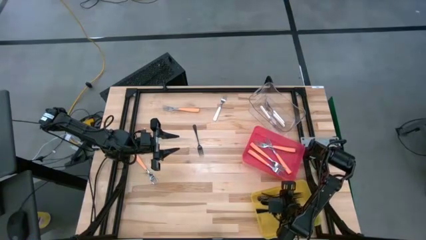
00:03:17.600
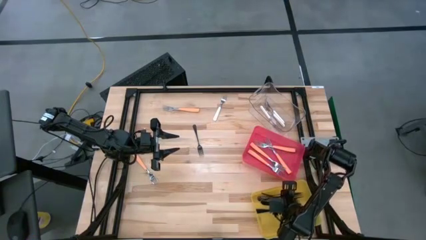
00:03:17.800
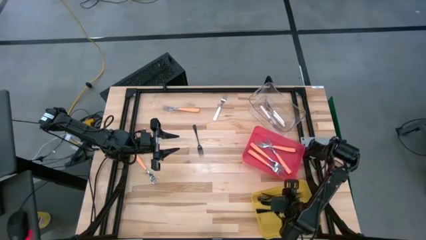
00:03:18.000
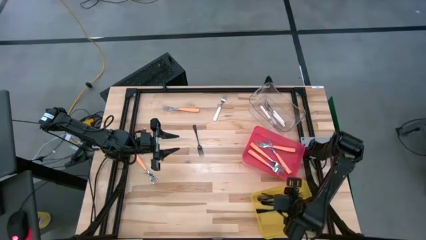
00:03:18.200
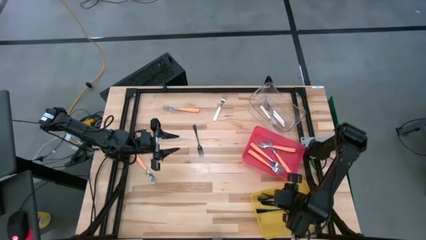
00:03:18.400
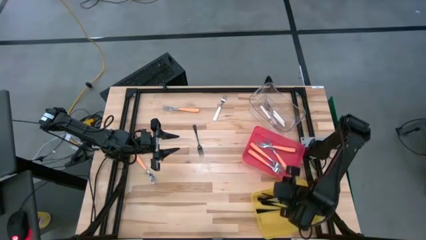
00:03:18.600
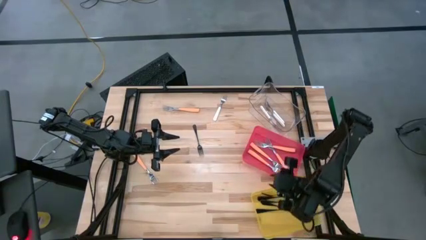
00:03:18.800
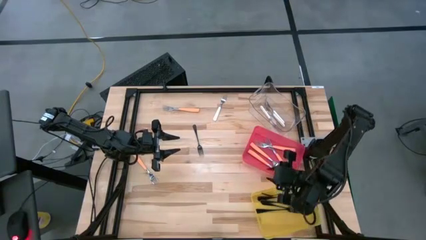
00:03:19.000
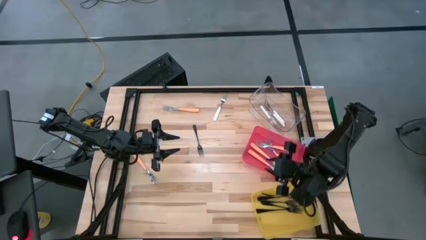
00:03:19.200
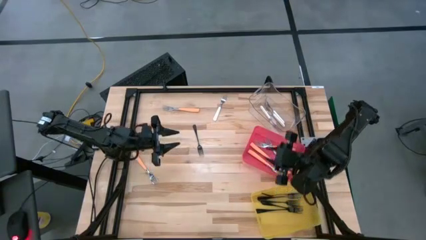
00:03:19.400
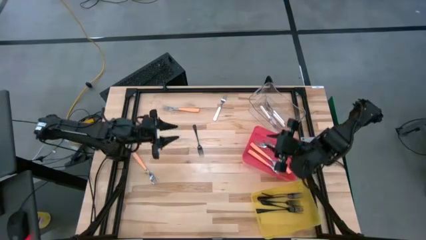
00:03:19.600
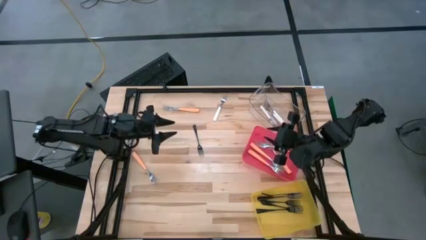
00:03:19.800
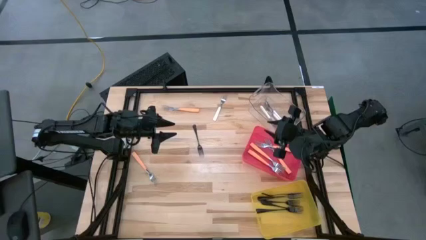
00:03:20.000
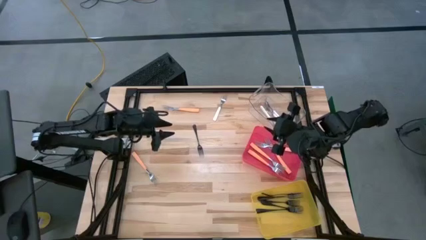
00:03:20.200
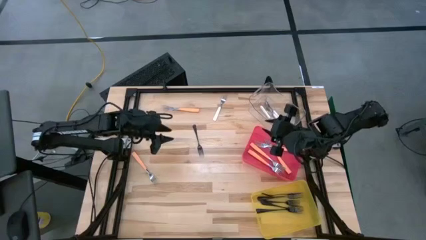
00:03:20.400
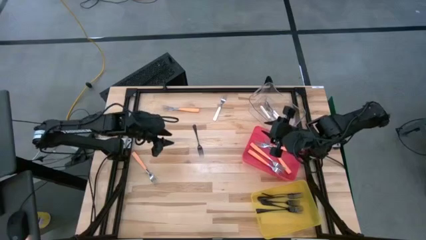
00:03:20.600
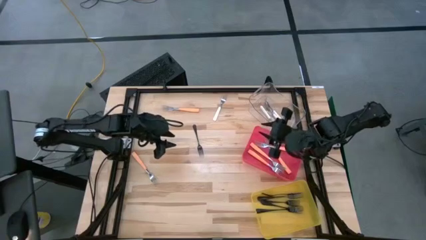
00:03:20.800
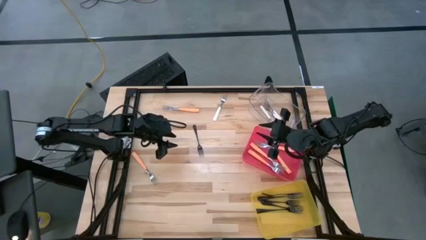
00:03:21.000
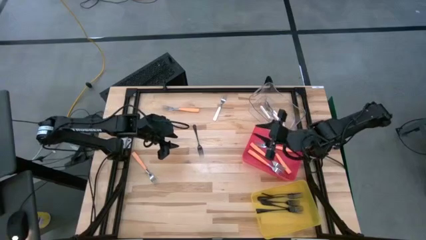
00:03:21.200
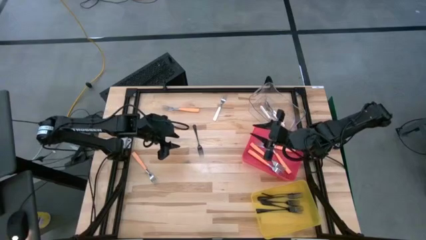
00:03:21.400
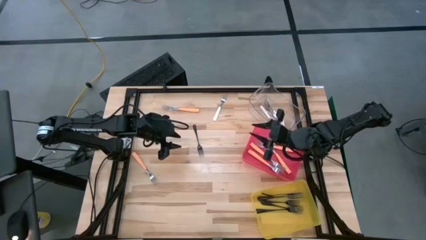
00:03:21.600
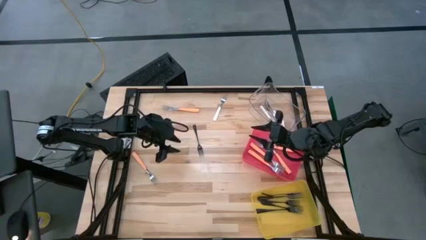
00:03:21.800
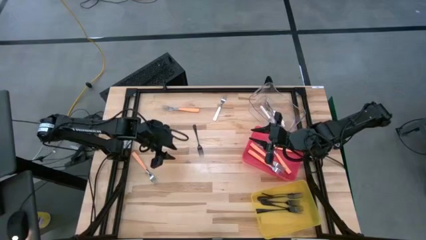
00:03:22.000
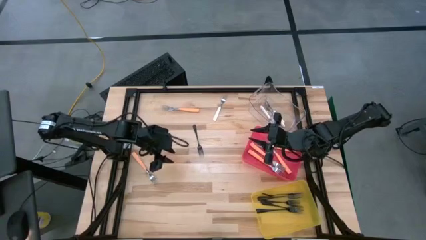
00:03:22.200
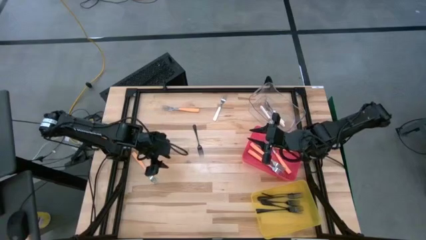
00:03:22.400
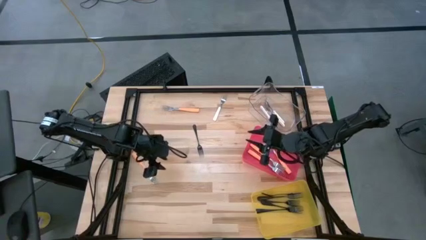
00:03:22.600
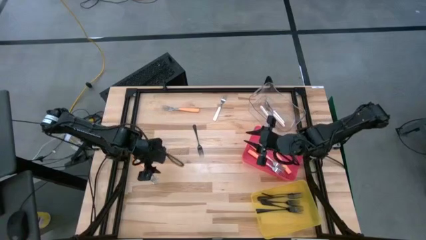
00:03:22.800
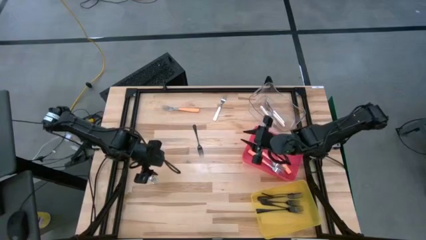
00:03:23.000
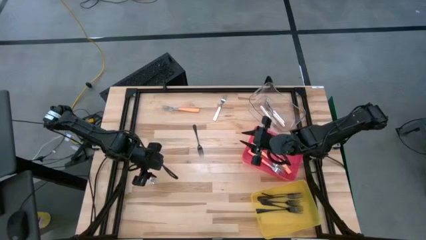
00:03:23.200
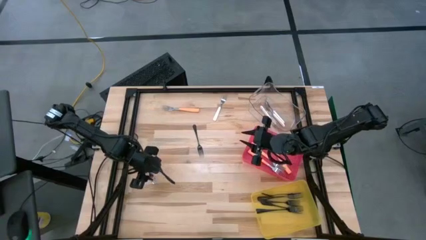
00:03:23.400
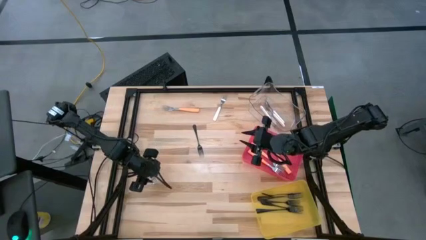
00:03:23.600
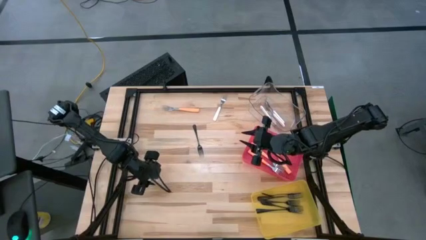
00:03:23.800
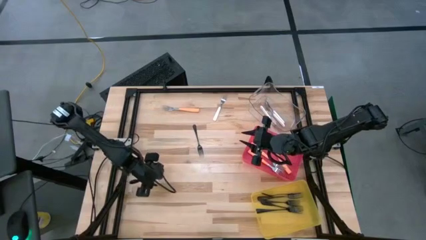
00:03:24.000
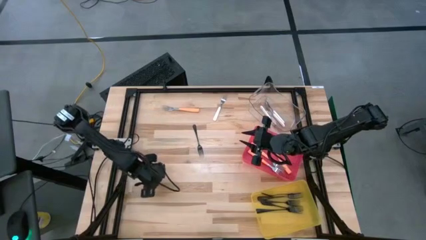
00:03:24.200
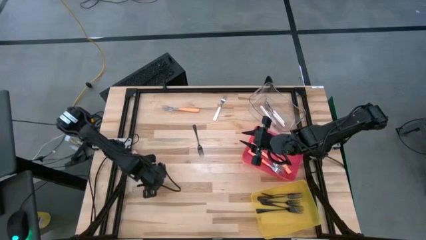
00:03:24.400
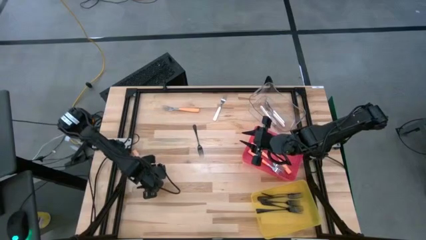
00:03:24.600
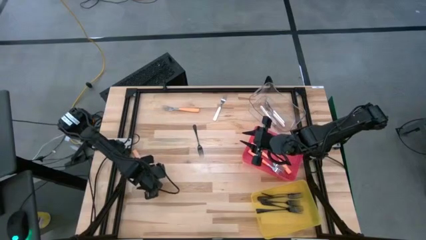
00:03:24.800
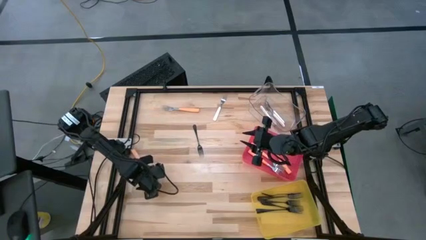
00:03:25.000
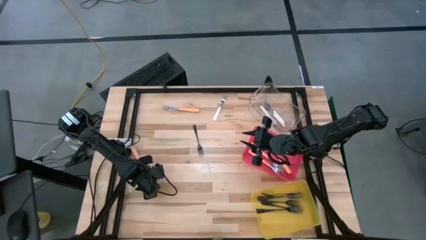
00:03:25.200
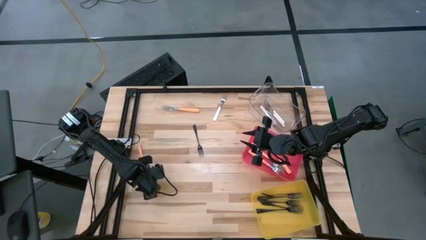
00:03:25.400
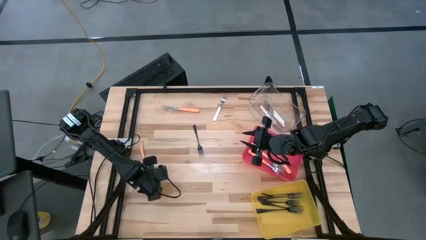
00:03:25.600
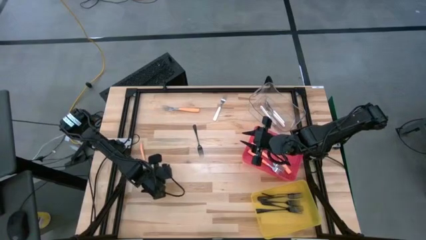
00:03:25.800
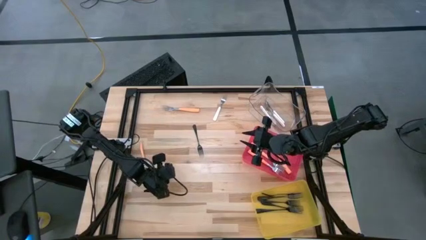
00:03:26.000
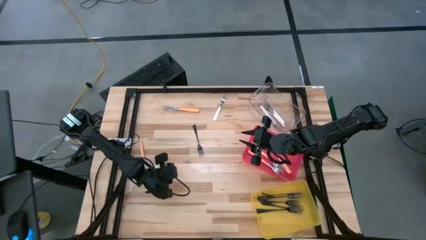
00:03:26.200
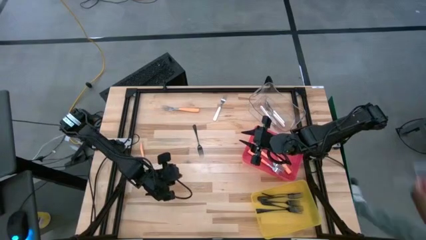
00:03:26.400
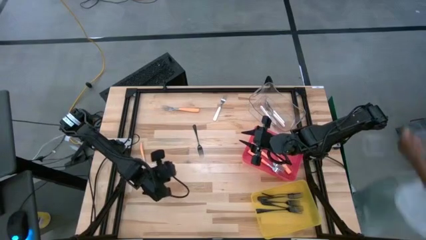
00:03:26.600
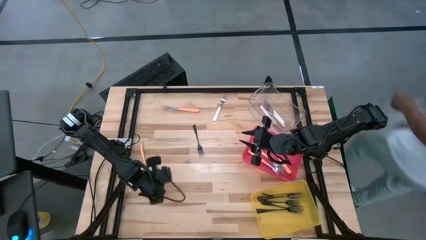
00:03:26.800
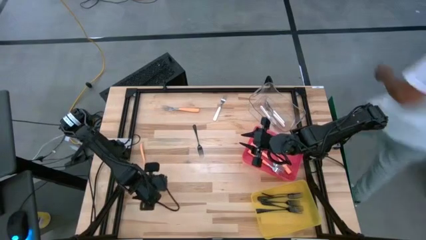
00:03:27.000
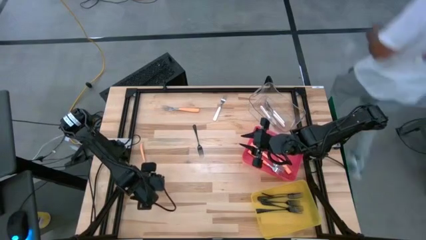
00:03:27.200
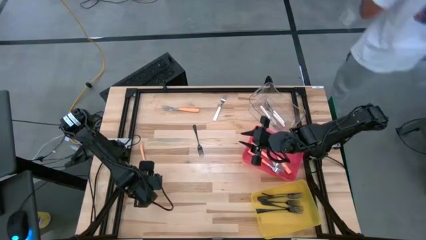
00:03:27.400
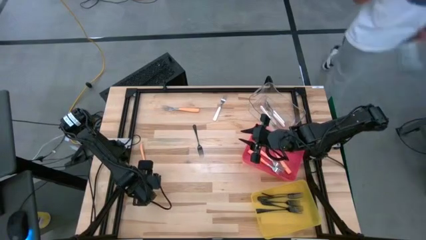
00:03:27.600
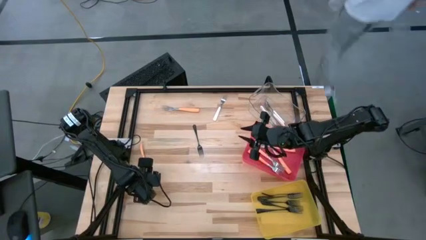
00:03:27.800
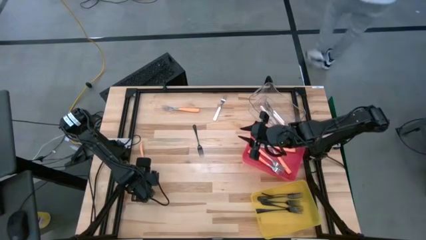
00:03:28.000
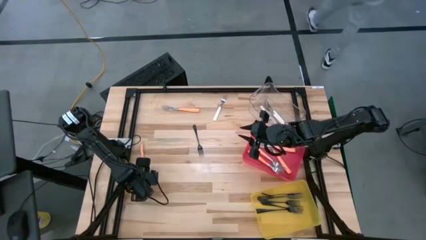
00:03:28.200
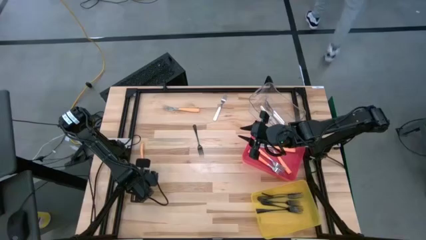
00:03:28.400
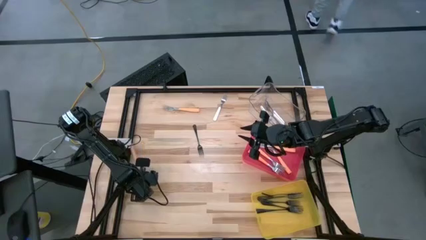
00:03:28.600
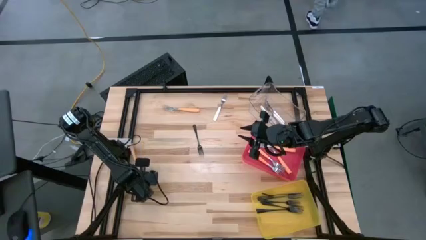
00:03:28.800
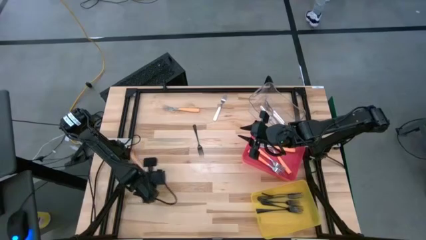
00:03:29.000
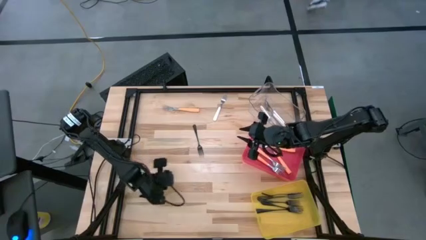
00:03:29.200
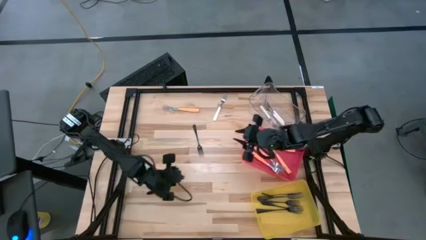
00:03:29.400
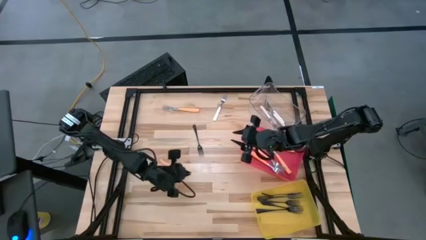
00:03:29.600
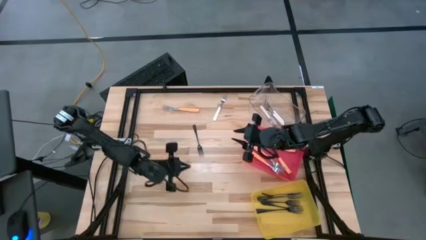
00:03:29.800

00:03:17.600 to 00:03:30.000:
Task: Sort silverware by color (type)
Put the orange fork into the red bin

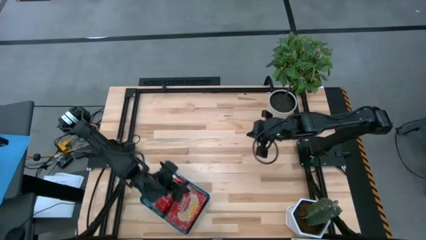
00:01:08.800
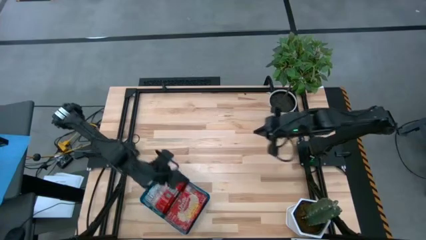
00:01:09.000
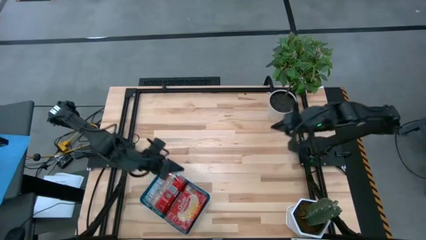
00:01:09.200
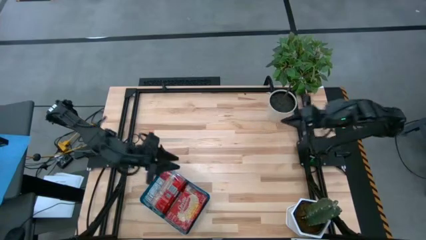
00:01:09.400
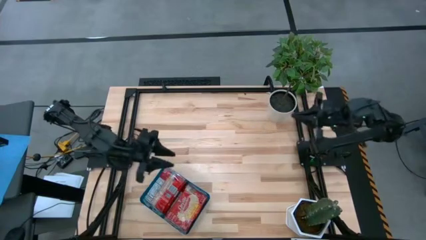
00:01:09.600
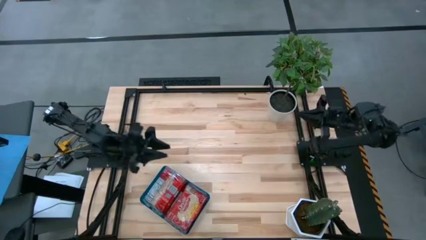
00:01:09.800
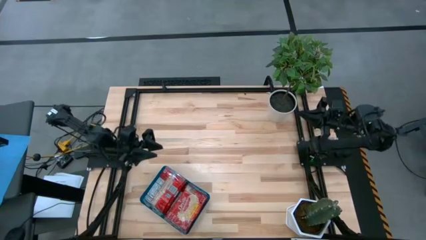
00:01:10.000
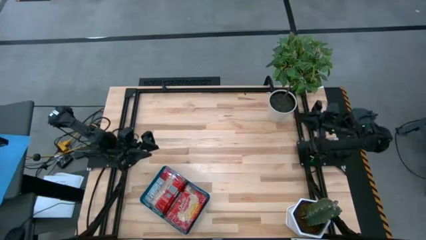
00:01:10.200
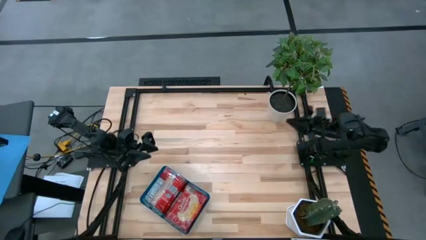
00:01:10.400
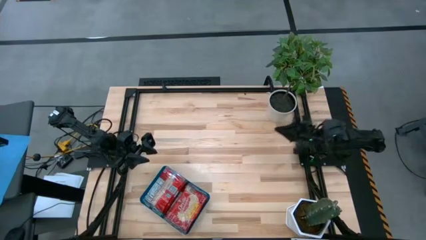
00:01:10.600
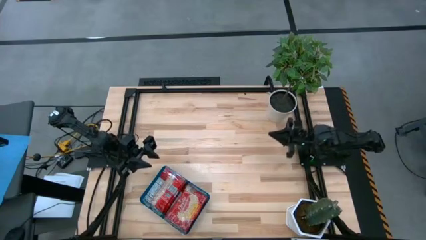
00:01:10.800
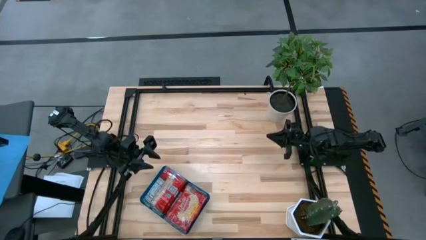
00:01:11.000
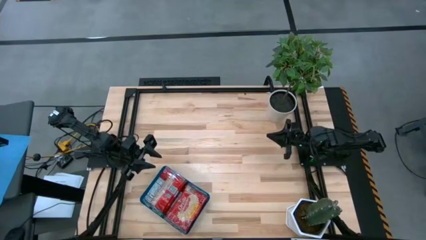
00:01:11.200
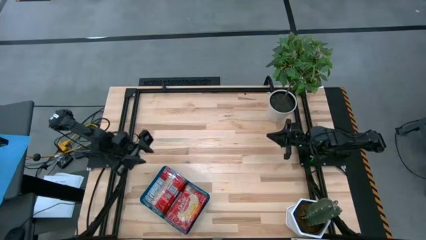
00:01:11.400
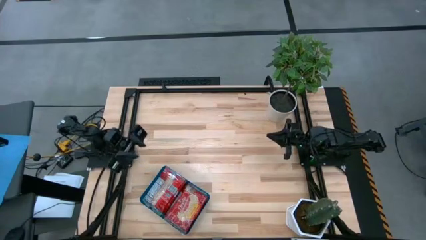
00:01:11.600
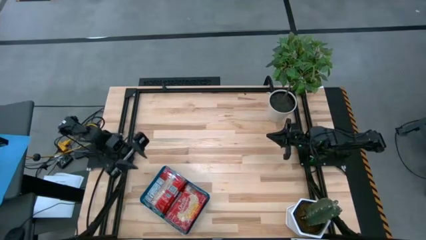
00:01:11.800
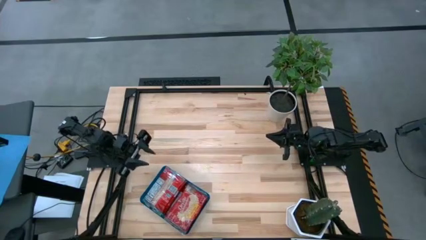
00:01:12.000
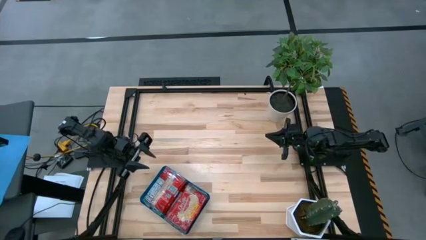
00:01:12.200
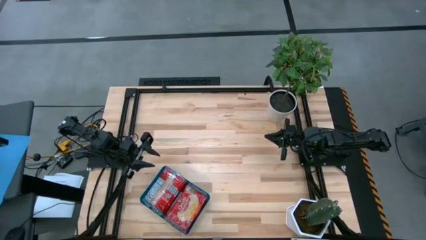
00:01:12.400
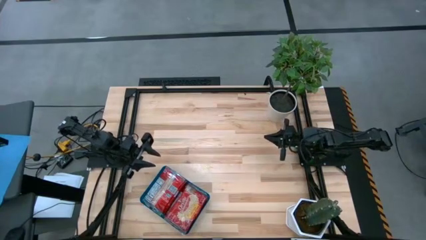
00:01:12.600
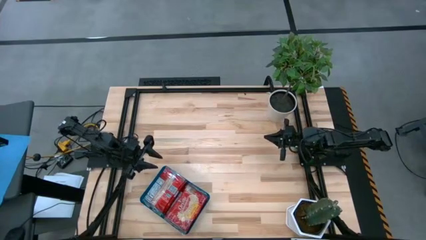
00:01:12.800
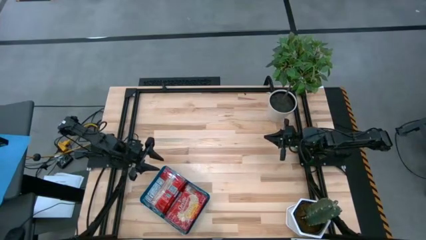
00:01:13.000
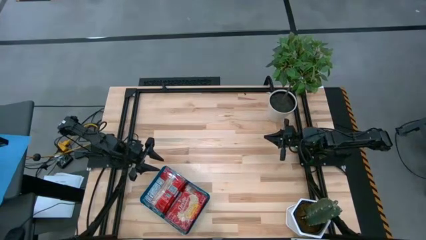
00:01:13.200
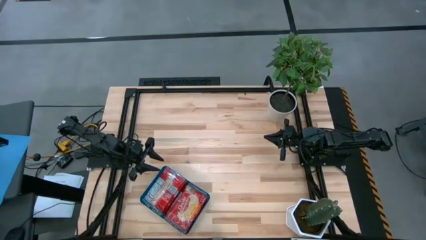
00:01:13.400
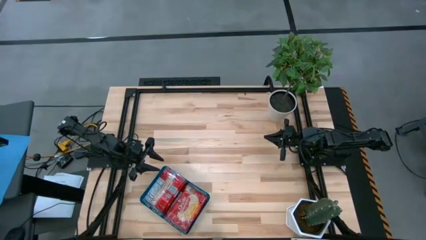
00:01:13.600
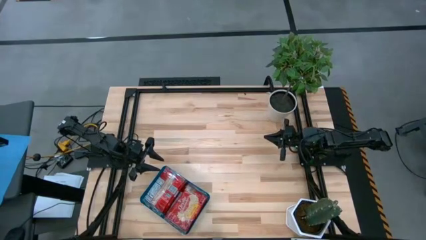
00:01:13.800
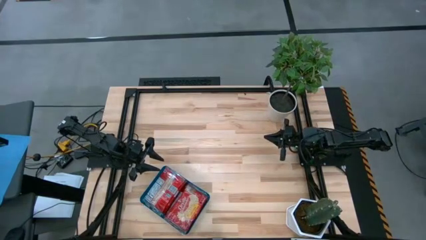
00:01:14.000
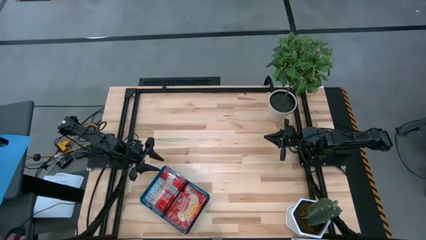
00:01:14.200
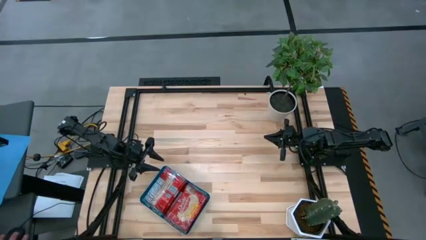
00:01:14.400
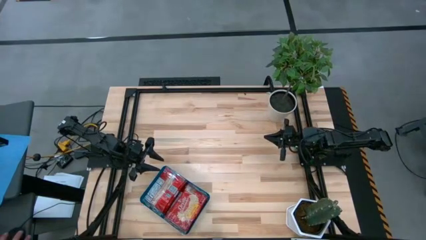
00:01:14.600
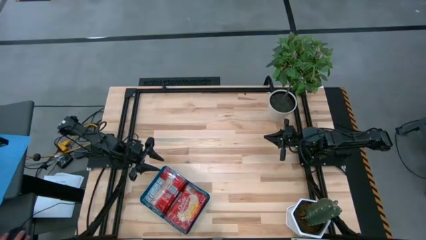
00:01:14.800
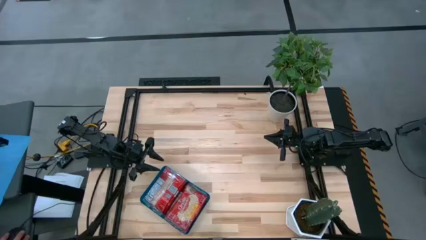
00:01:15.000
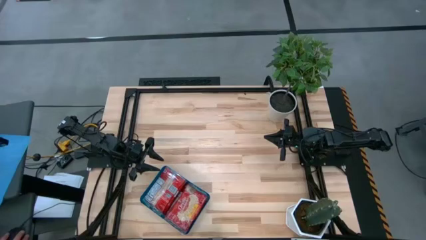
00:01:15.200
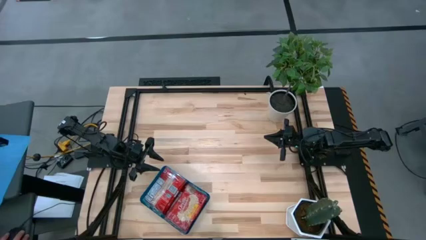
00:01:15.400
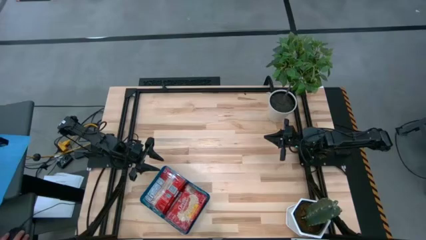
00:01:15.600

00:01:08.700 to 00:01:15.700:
Task: Sort popcorn bags into baskets
Return to Home Position
